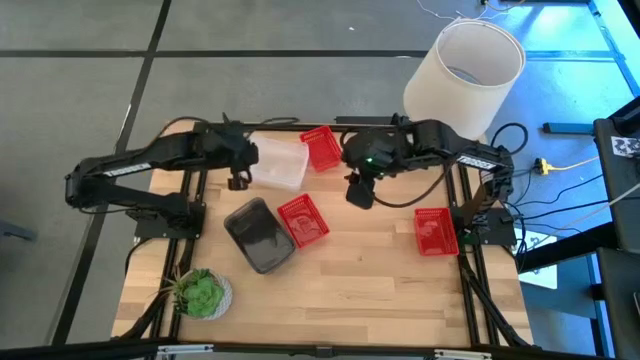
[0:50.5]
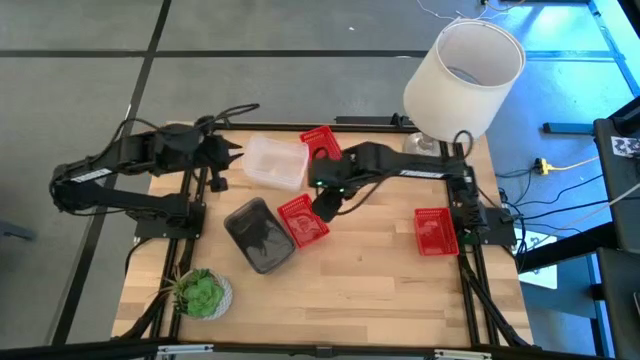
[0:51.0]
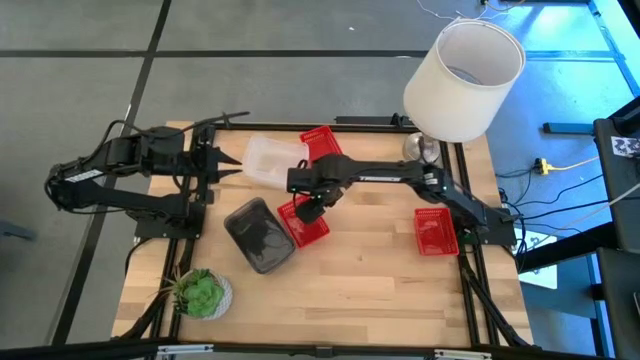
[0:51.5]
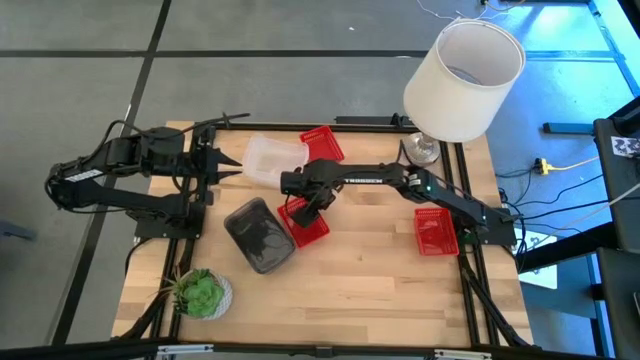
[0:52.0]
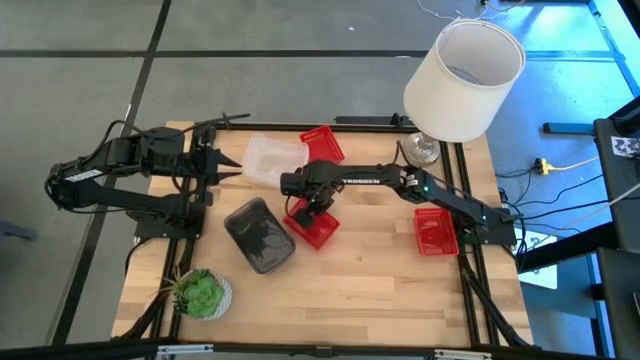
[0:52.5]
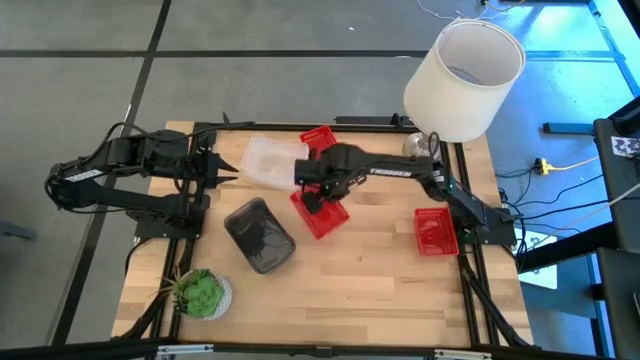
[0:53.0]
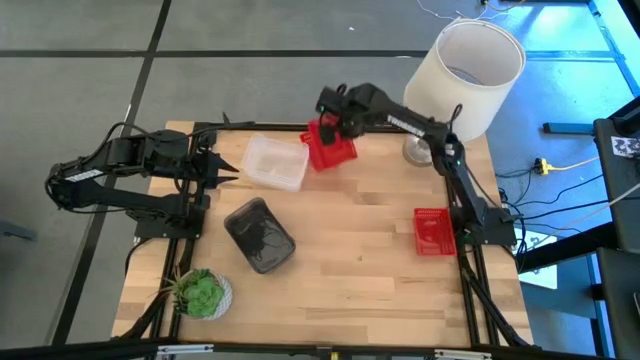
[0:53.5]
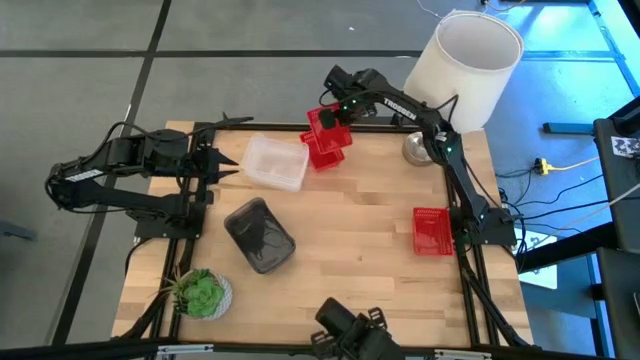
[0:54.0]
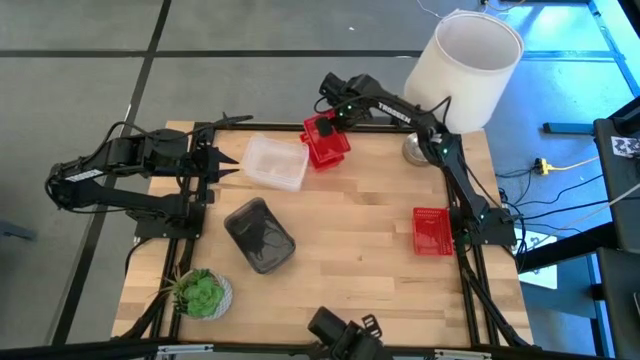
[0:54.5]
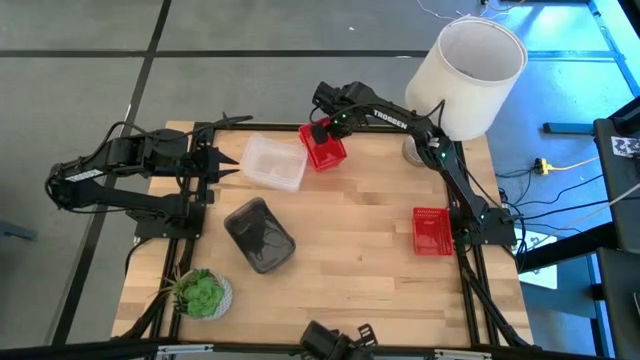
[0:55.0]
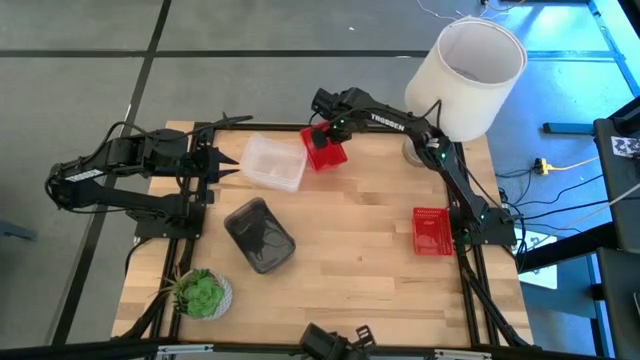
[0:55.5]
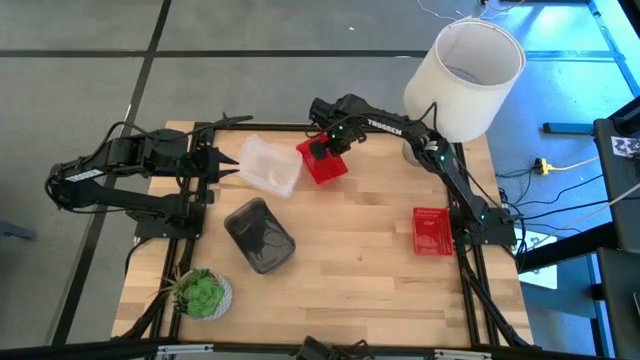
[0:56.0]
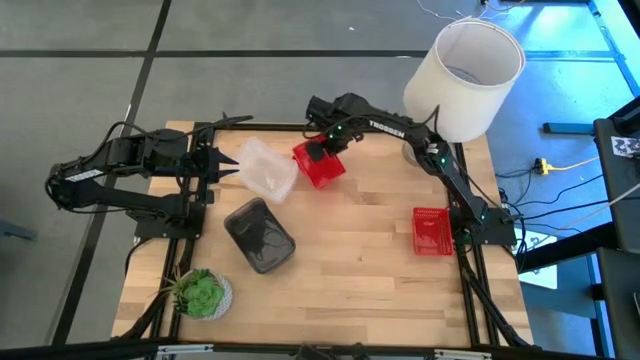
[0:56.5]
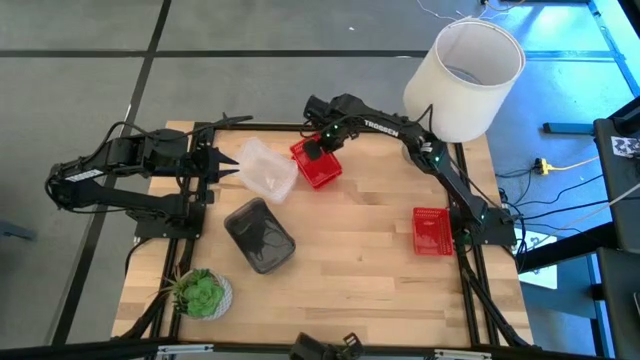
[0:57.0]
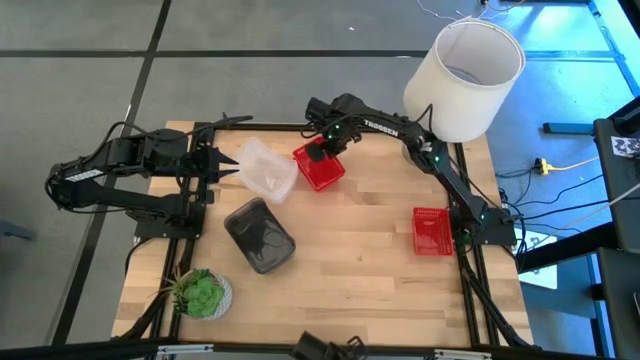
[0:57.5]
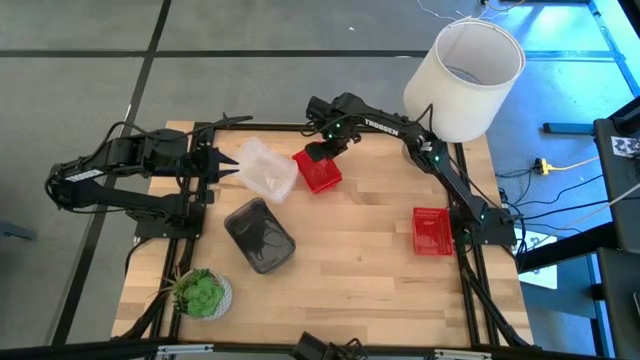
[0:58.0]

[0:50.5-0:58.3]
Stack the bottom left orange bin on the top orange bin

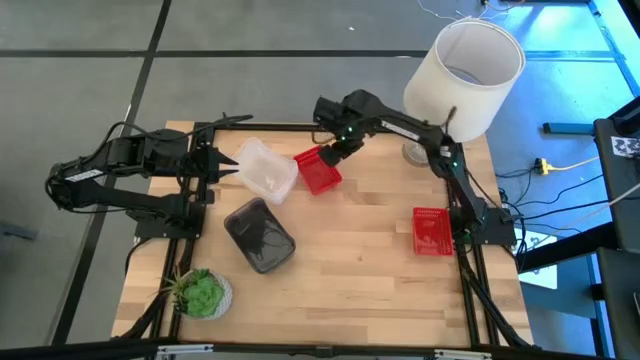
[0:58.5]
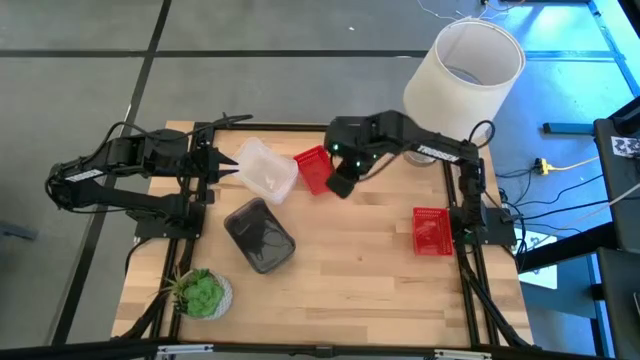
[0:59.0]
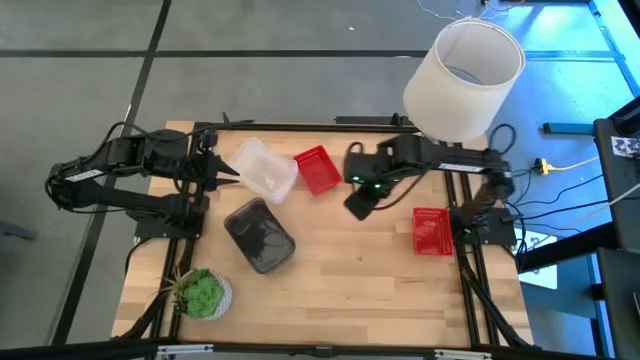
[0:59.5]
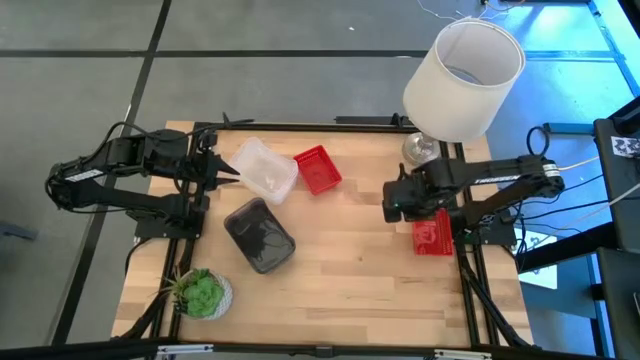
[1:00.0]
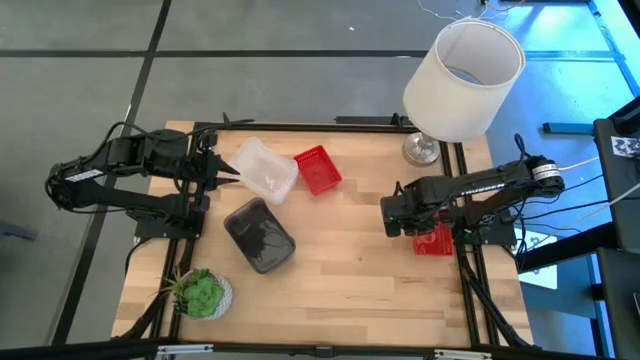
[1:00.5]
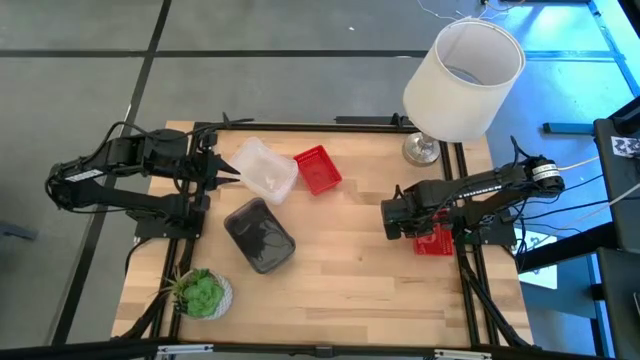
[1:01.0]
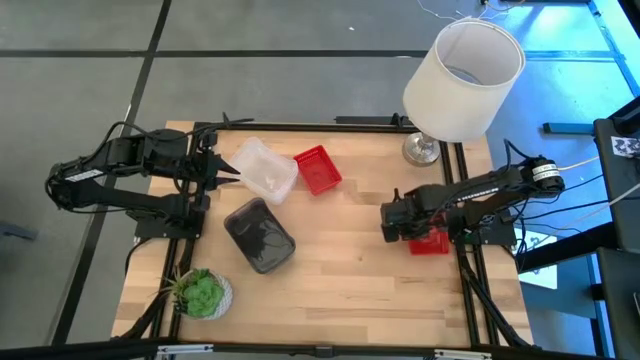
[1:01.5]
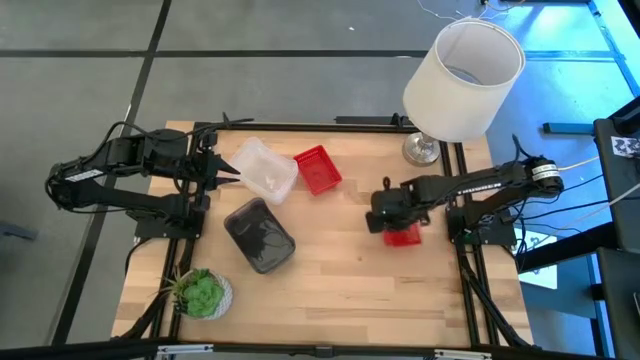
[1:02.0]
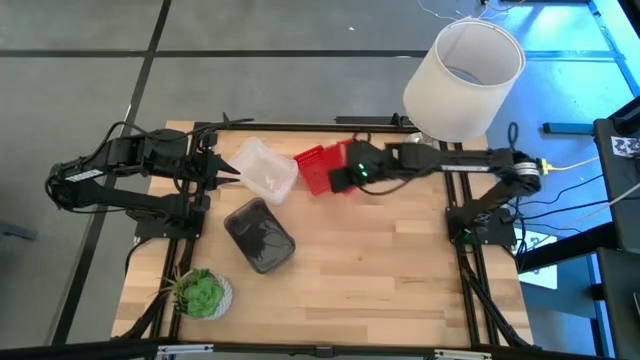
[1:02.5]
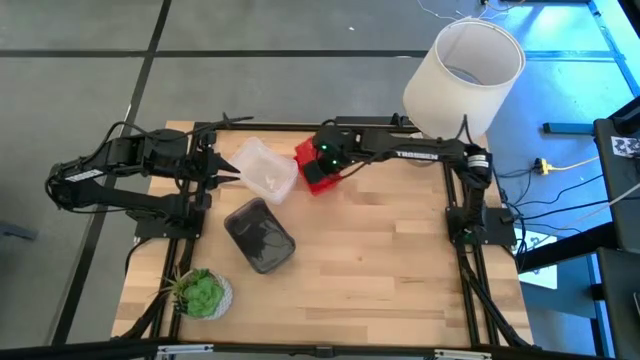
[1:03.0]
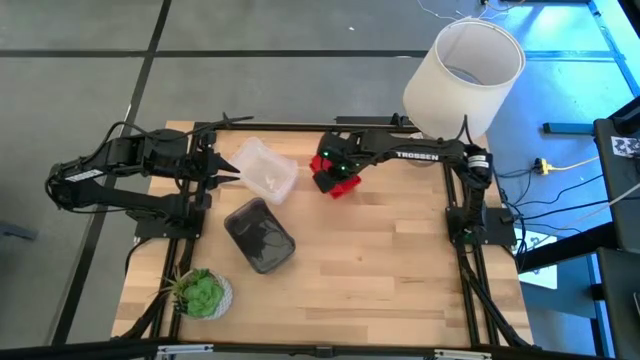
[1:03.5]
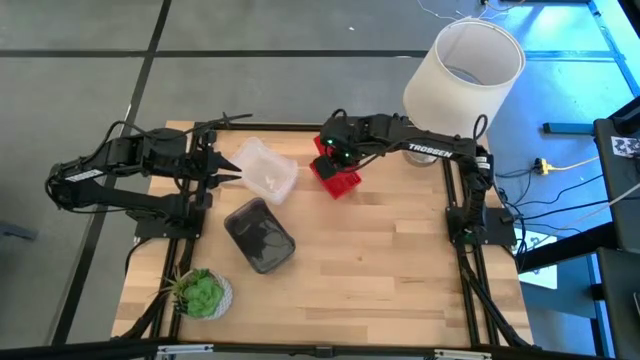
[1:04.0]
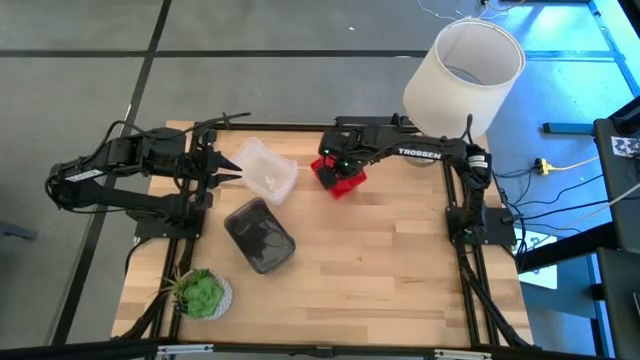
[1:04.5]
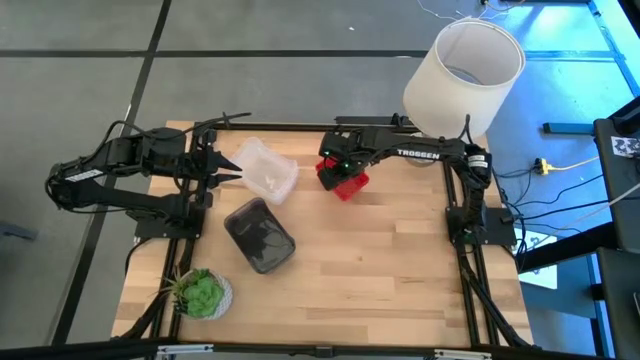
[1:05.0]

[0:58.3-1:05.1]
Stack the bottom orange bin on the stacked orange bins

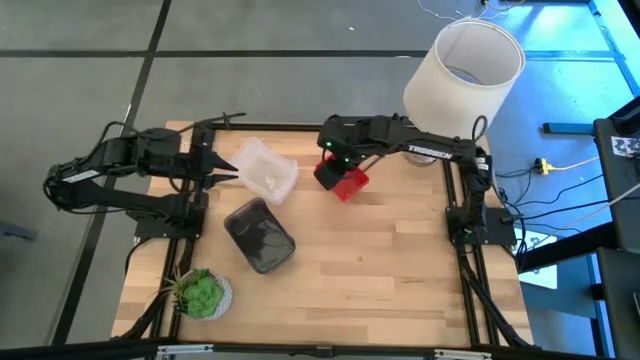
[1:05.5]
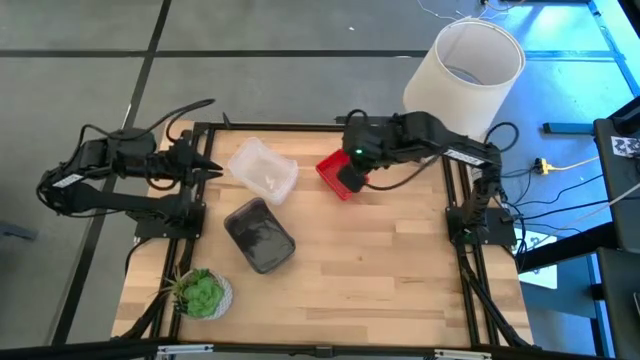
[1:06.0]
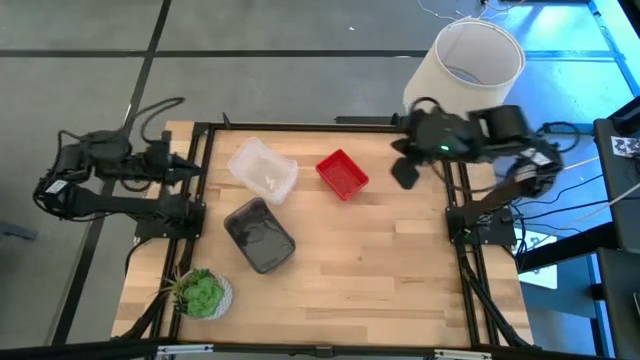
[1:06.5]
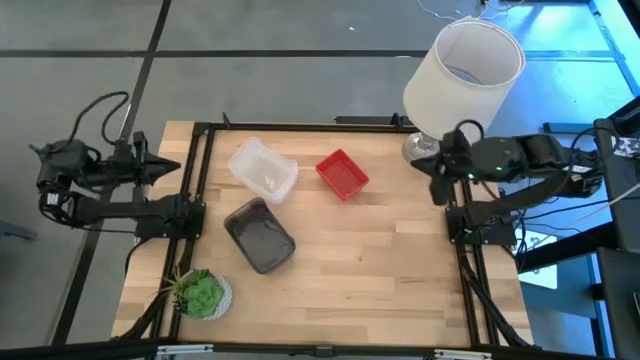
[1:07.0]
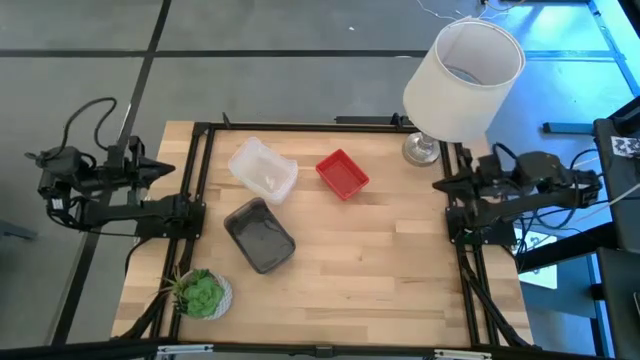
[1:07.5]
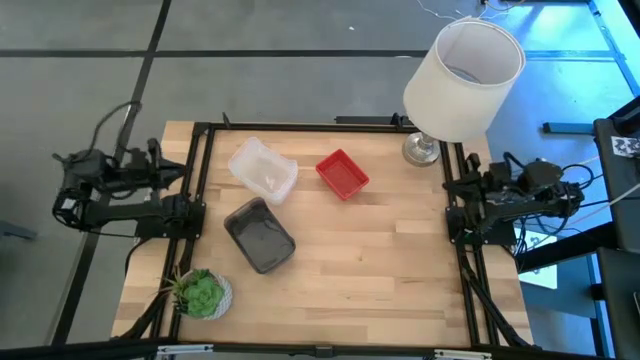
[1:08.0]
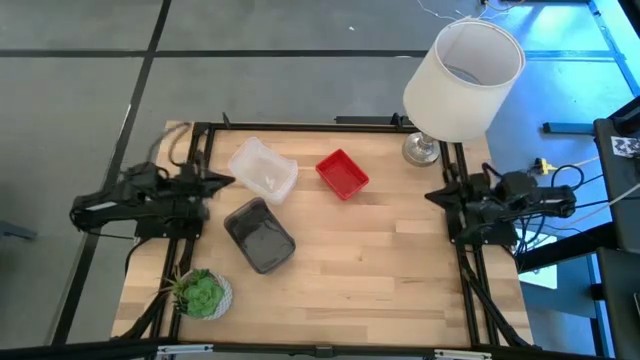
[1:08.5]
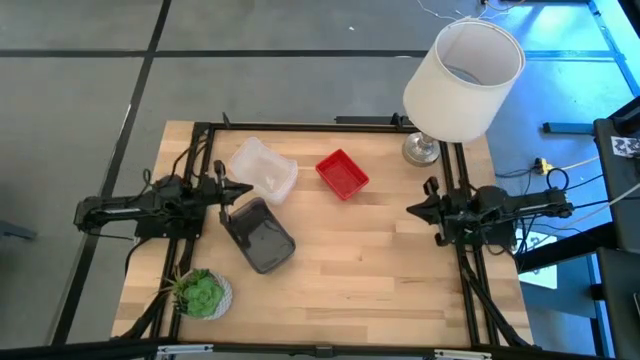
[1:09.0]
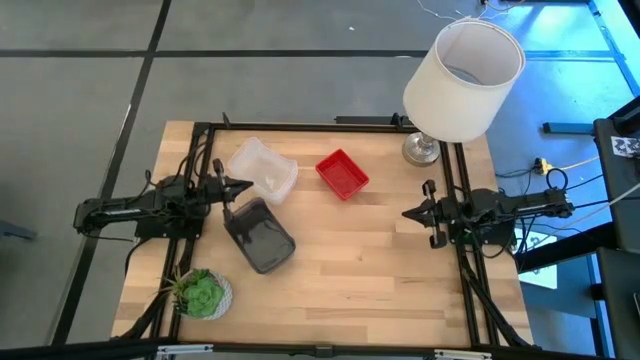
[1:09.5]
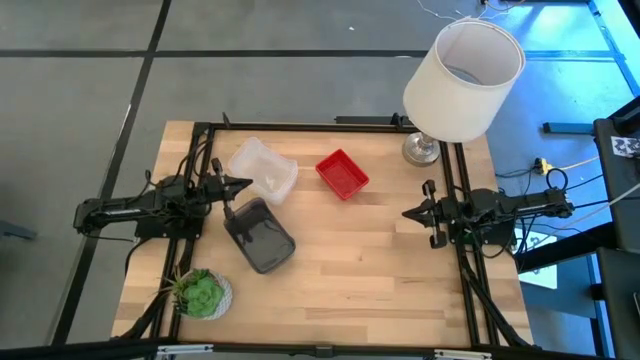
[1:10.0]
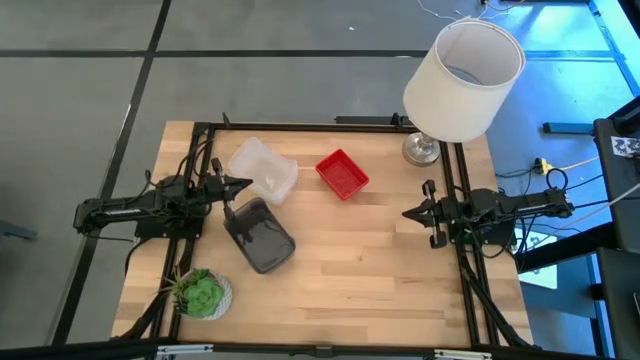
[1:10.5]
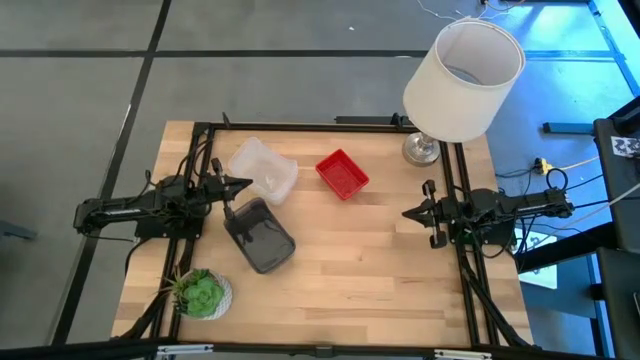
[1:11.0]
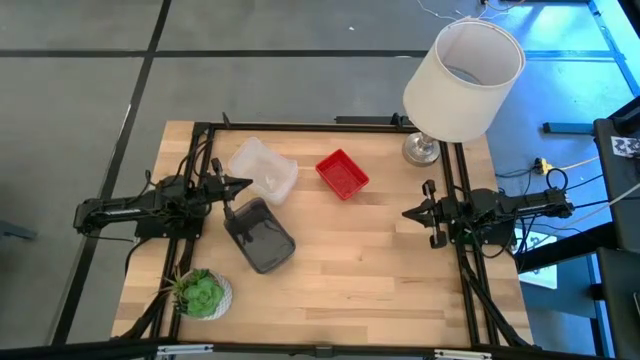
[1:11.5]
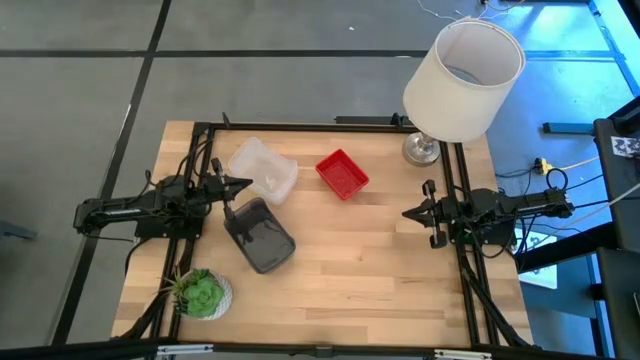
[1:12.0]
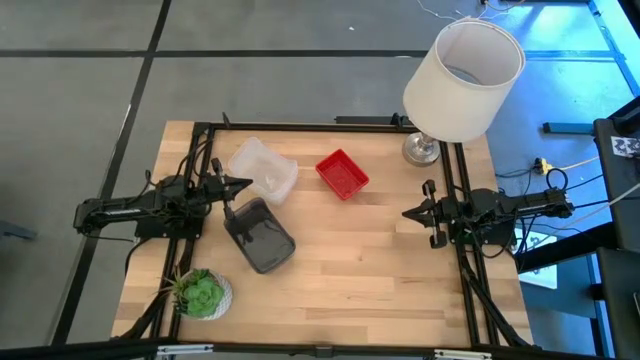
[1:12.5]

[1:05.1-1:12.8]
Return to Home Position
